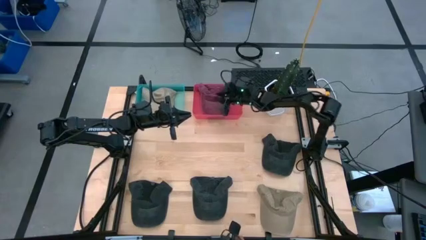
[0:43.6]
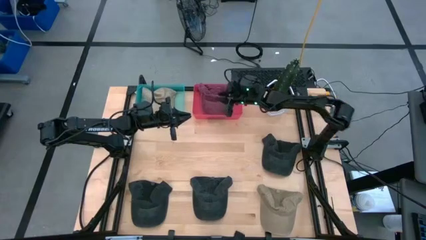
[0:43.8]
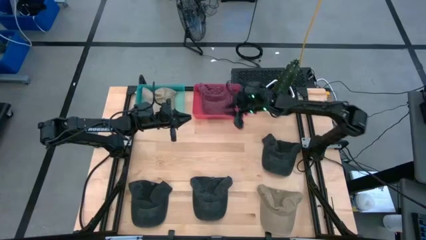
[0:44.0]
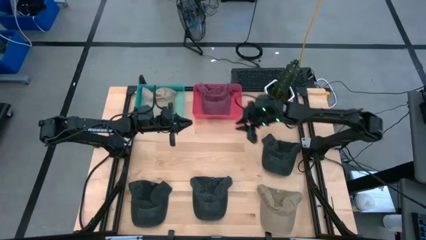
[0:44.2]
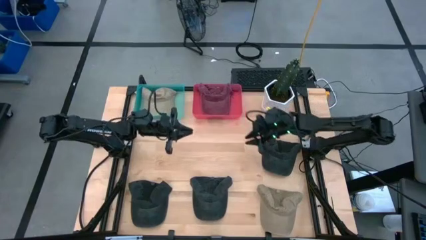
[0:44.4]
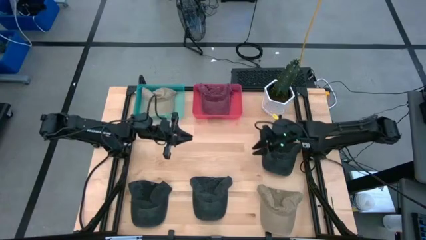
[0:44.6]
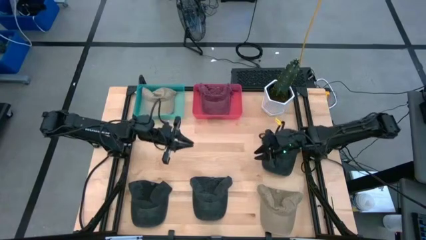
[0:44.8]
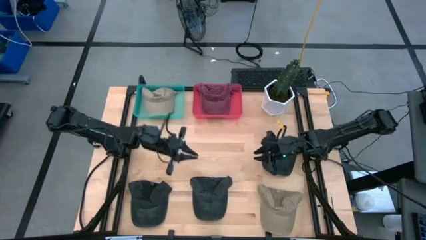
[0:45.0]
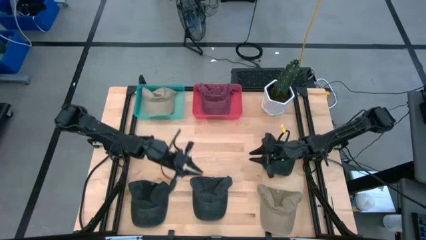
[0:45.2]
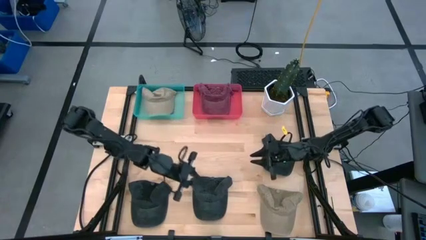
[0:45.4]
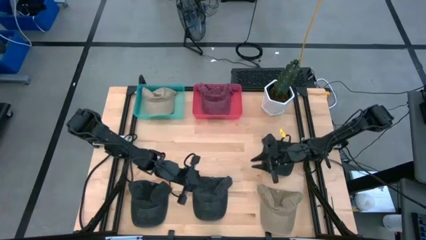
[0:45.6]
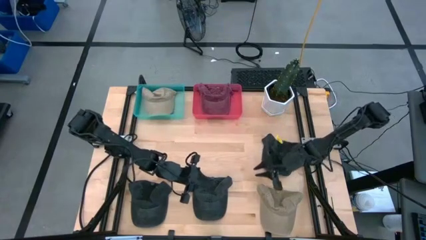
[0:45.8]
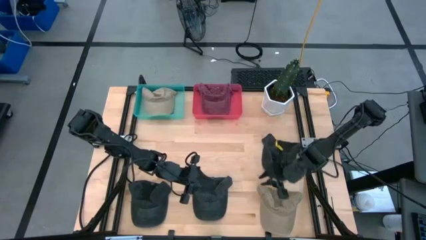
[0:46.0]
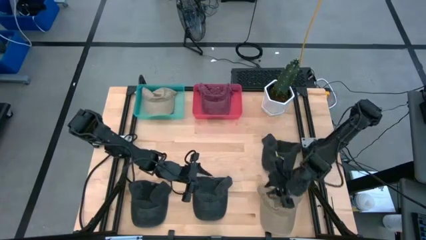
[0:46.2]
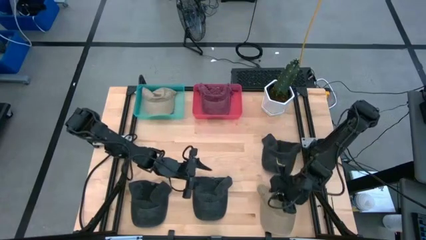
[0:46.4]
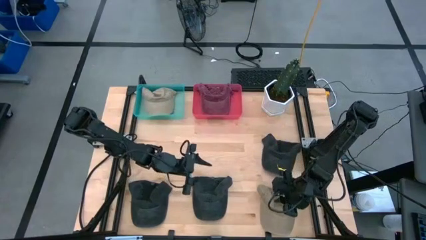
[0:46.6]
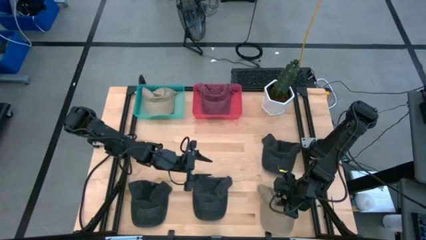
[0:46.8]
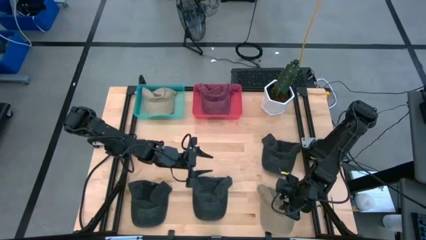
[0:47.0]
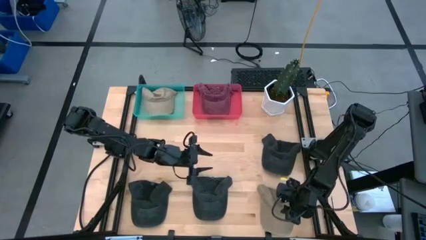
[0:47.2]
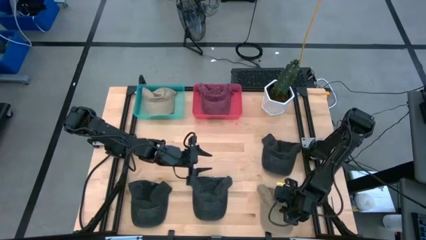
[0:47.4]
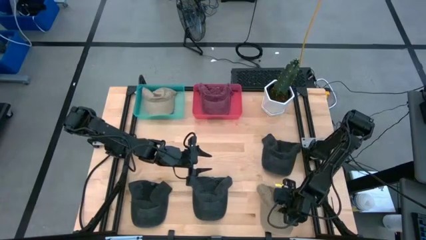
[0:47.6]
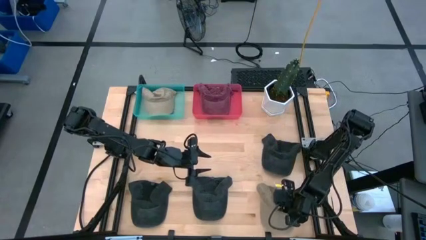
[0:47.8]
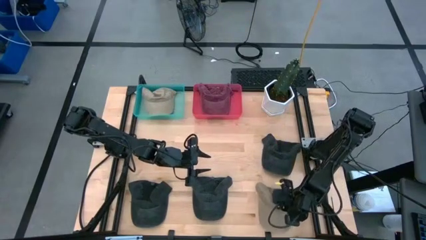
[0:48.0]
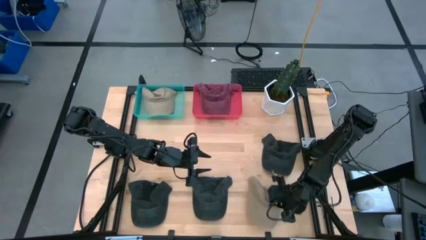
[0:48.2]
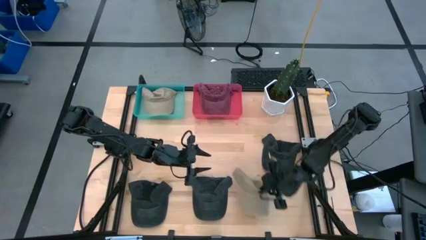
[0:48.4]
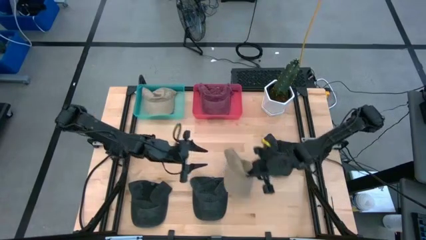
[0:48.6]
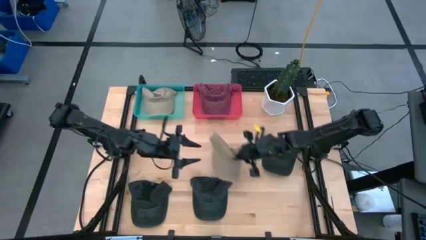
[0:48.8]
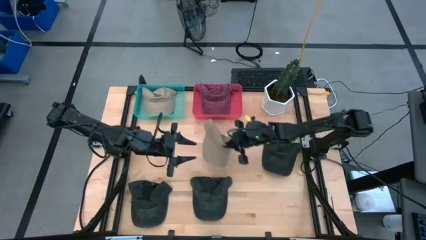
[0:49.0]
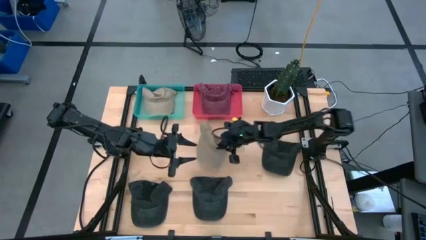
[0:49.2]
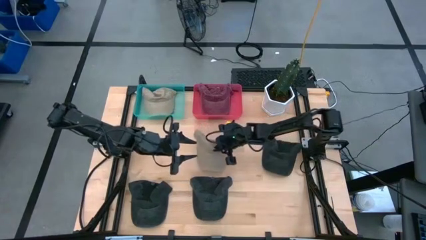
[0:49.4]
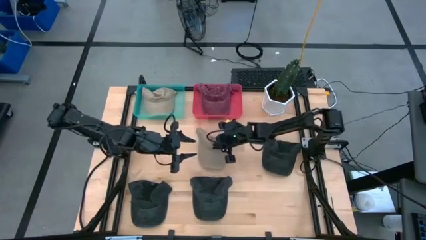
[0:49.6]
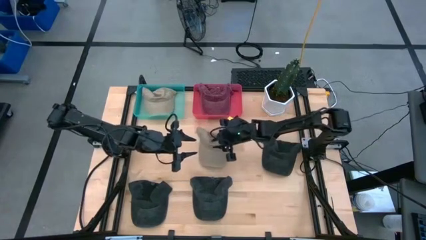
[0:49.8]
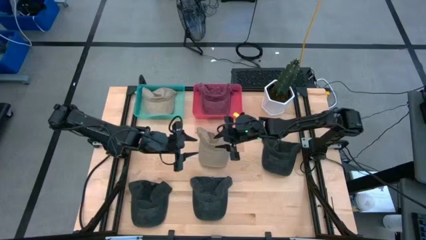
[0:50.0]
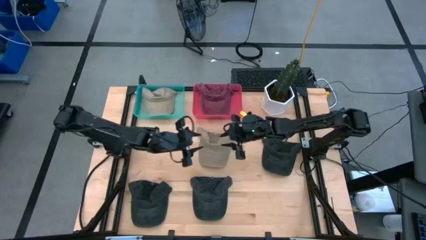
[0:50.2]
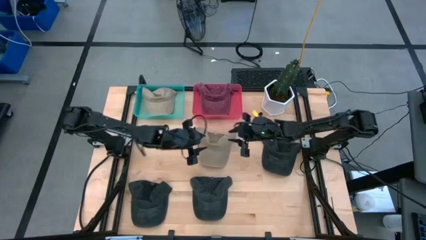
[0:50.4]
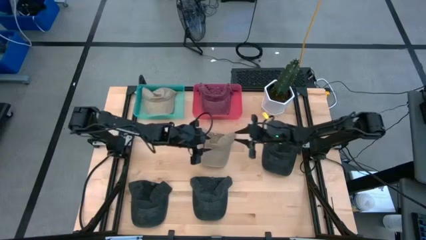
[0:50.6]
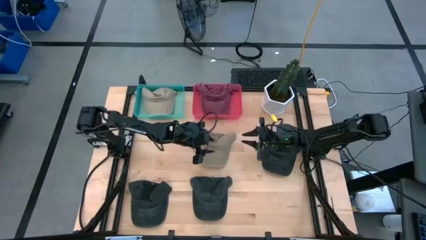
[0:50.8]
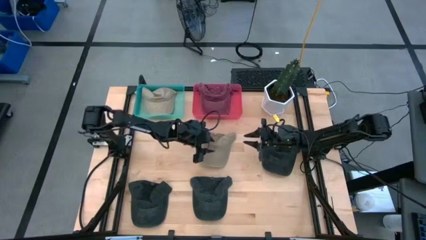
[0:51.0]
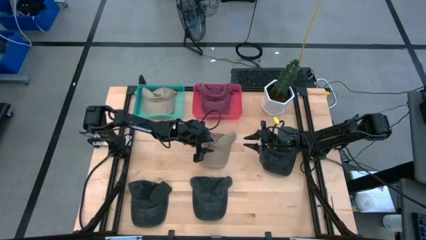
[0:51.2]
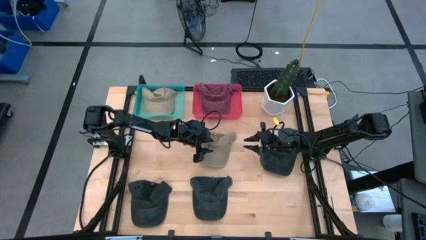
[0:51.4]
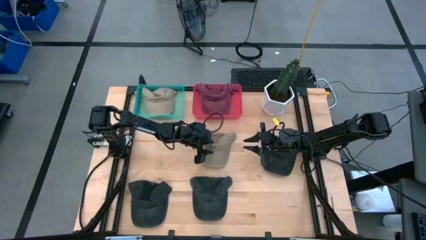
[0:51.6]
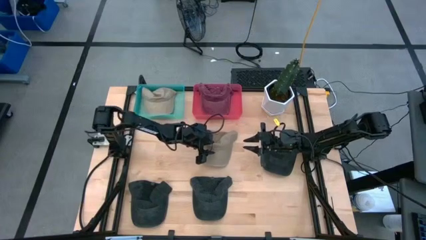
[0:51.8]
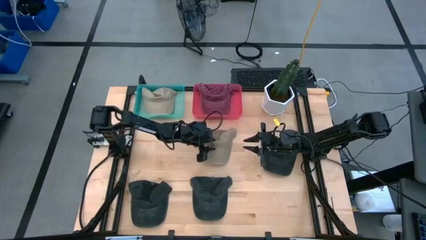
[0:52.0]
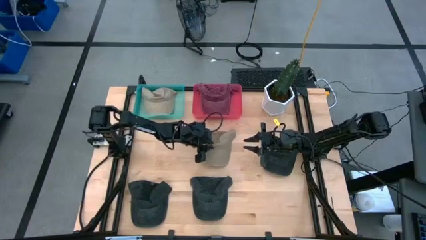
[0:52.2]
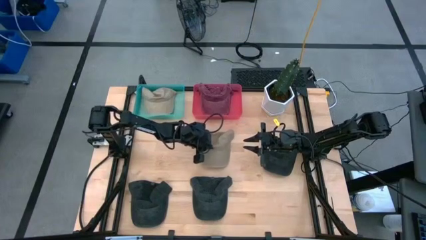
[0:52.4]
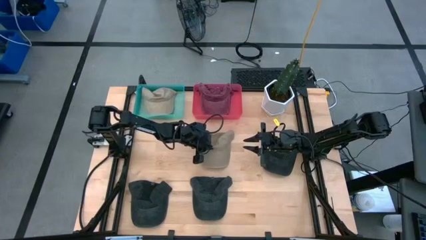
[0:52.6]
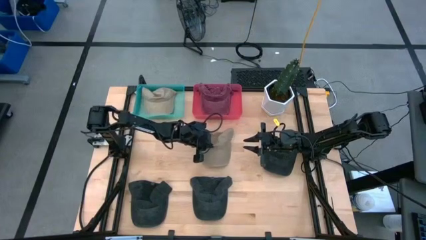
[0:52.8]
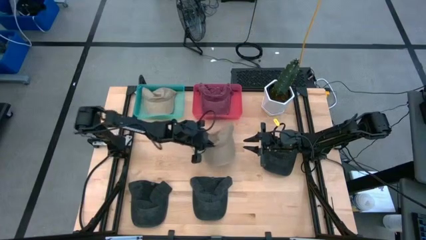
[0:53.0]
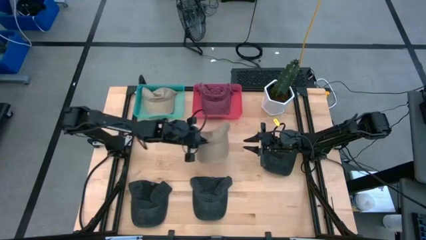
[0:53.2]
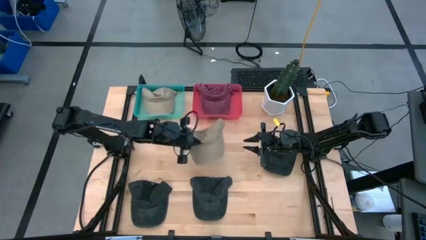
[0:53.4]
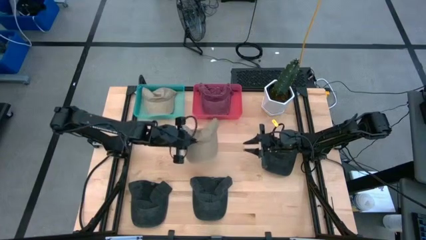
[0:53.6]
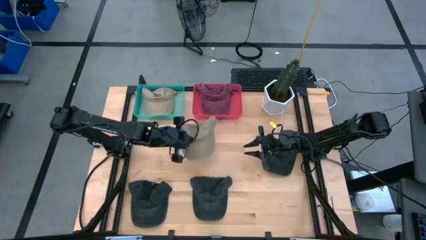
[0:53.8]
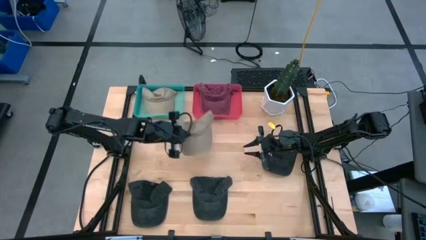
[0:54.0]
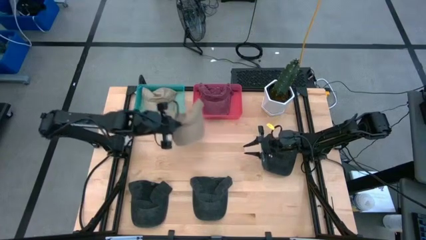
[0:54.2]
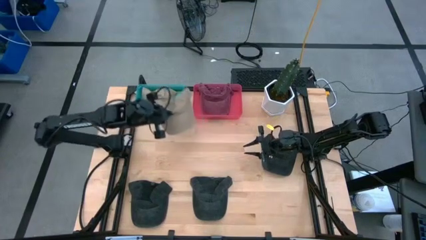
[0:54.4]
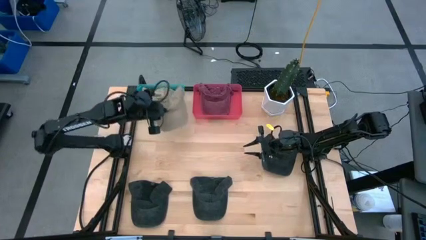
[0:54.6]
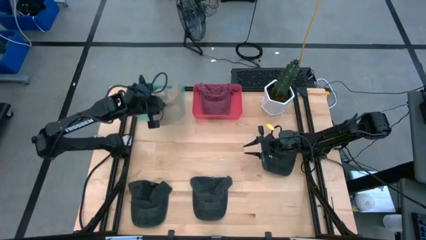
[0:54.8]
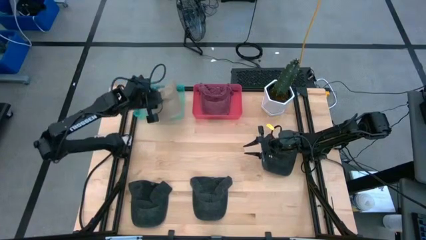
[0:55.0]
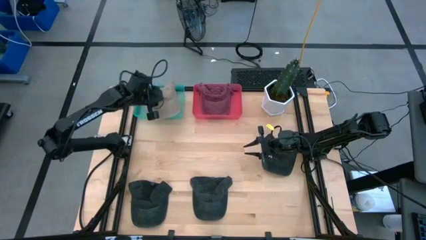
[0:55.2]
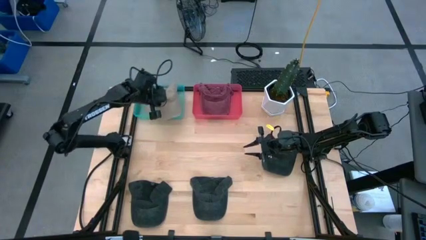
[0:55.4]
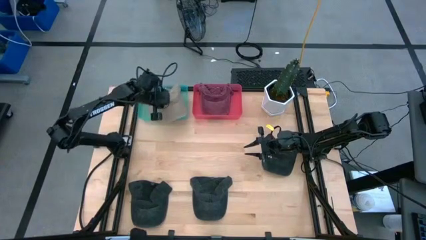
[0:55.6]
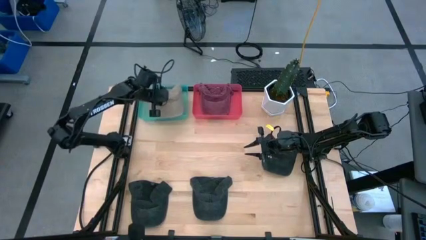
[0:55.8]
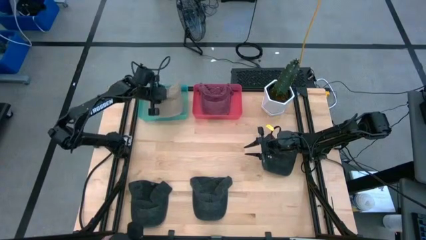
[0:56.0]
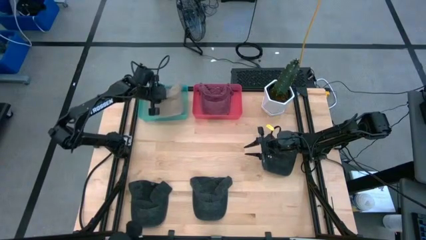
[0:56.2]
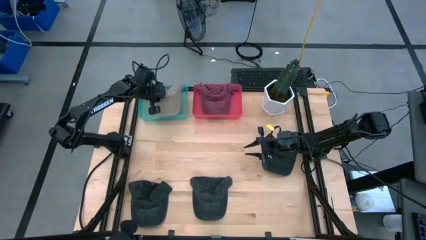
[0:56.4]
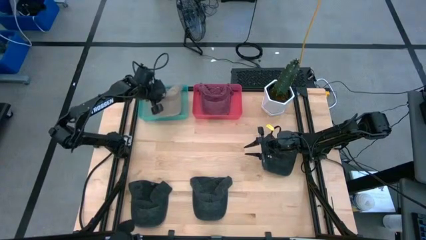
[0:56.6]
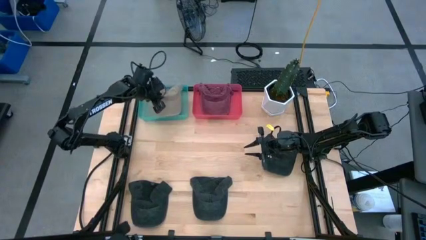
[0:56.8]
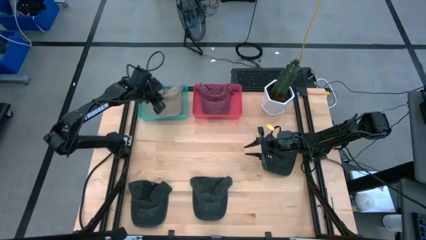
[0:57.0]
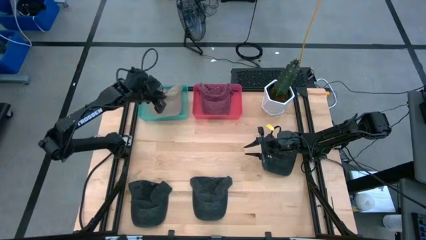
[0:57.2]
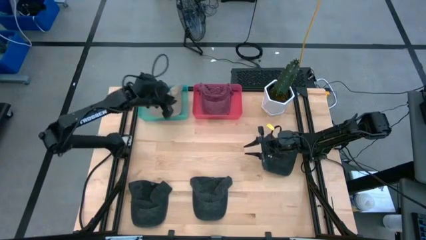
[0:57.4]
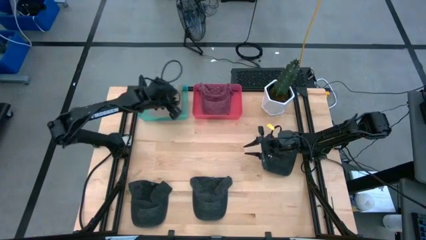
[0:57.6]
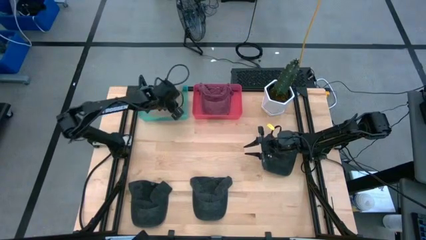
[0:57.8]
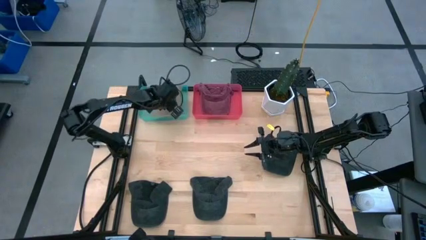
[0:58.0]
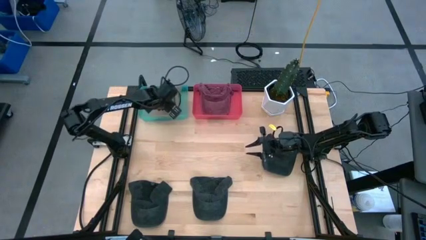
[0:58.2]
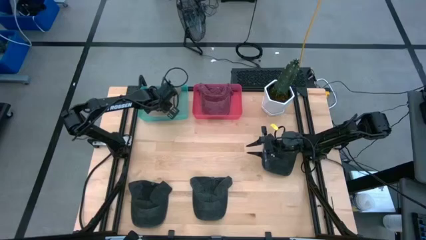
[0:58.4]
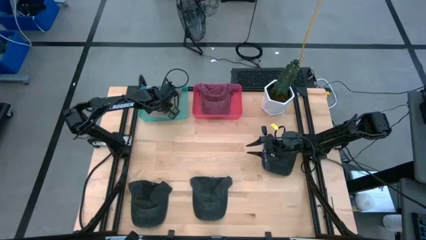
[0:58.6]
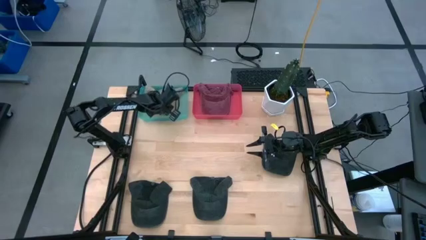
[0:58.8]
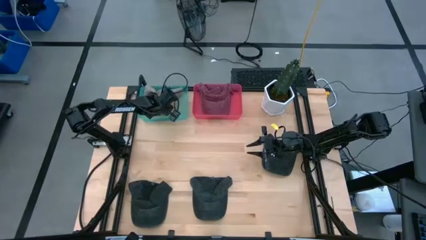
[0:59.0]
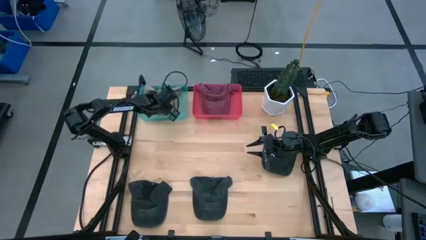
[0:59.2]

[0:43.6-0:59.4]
Task: Pick & Place hat
Put the brown cap into the blue bin
